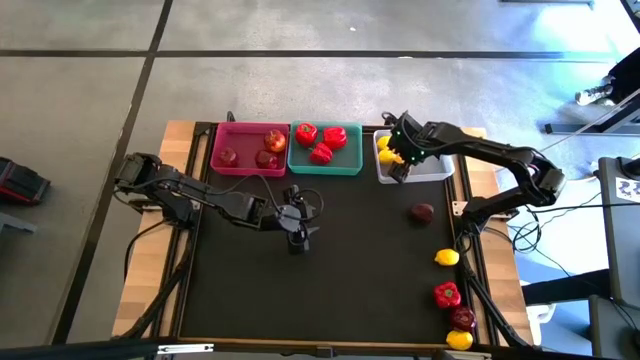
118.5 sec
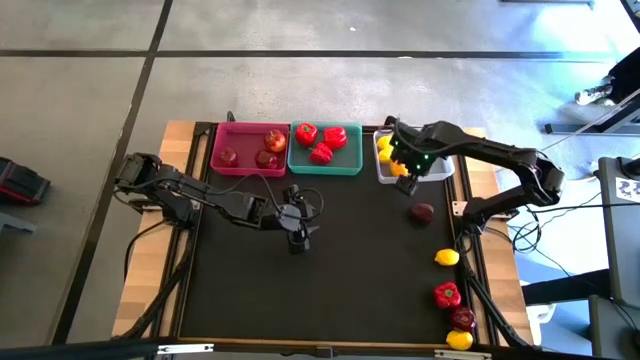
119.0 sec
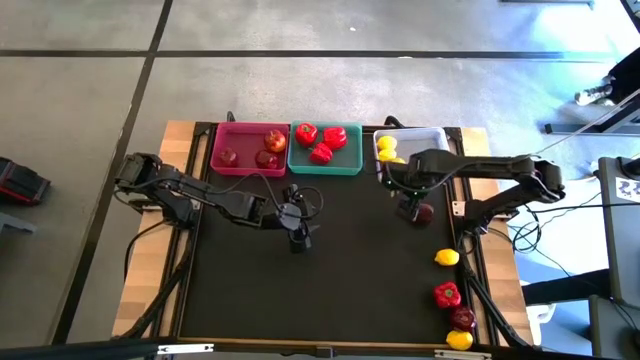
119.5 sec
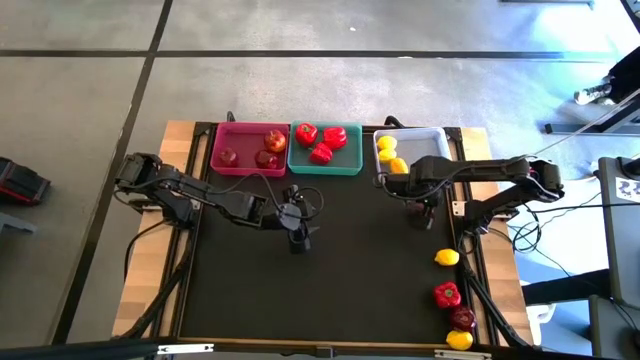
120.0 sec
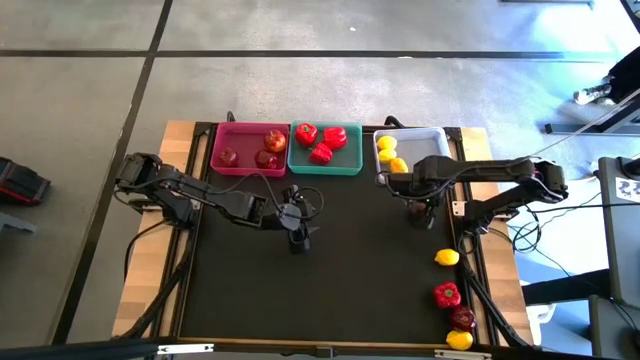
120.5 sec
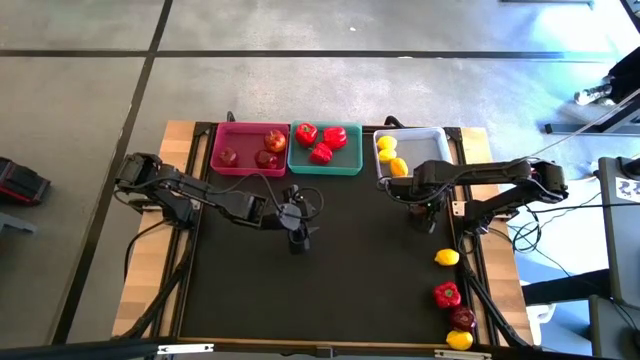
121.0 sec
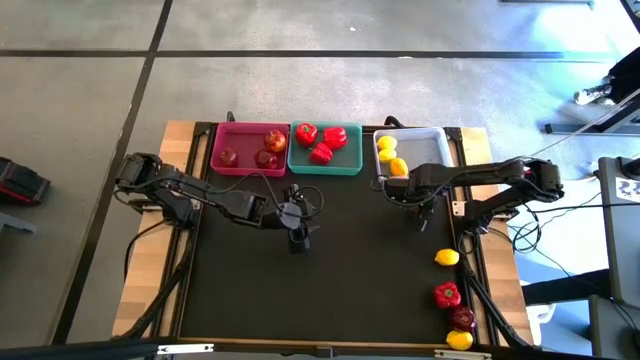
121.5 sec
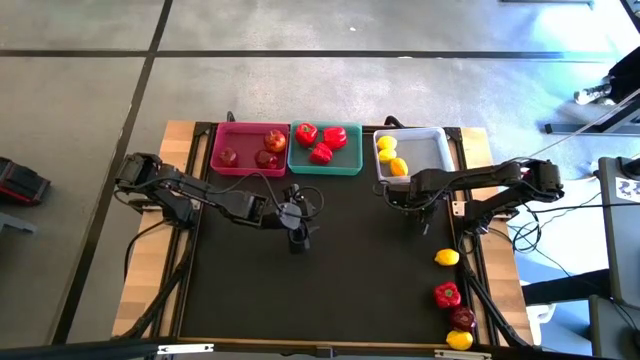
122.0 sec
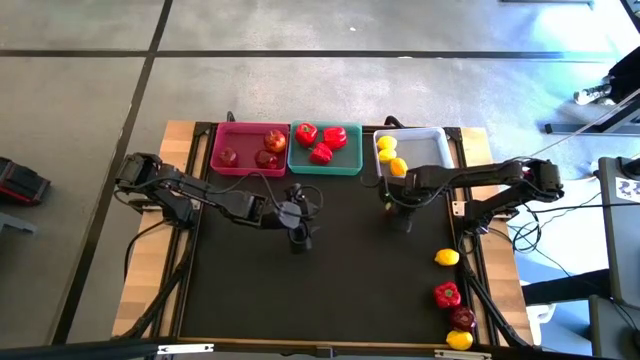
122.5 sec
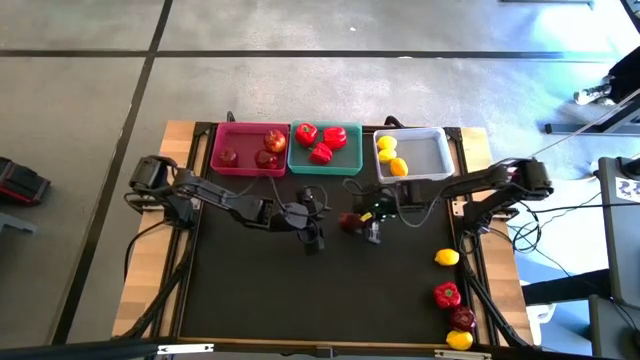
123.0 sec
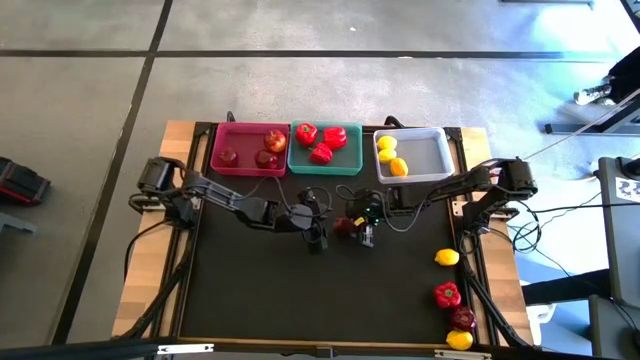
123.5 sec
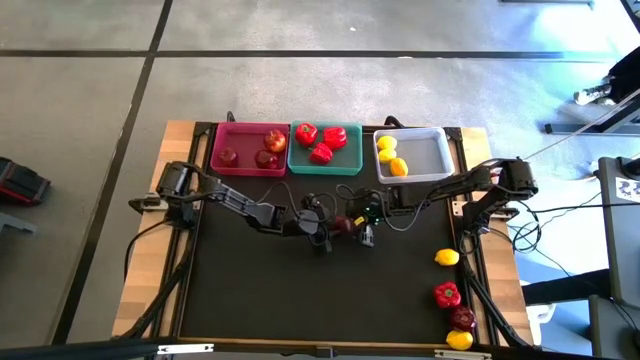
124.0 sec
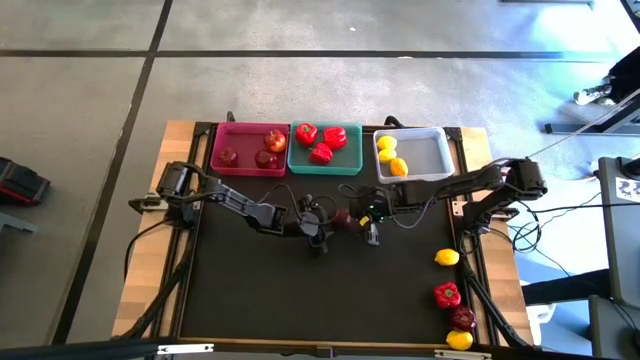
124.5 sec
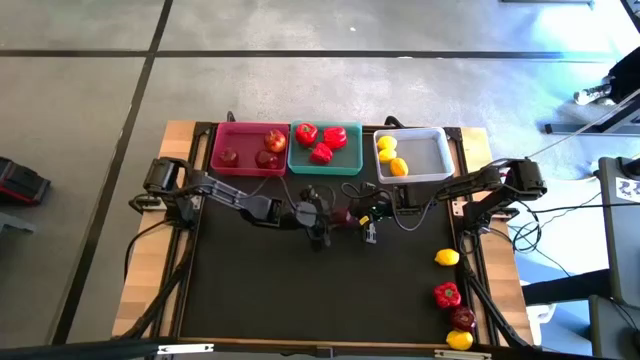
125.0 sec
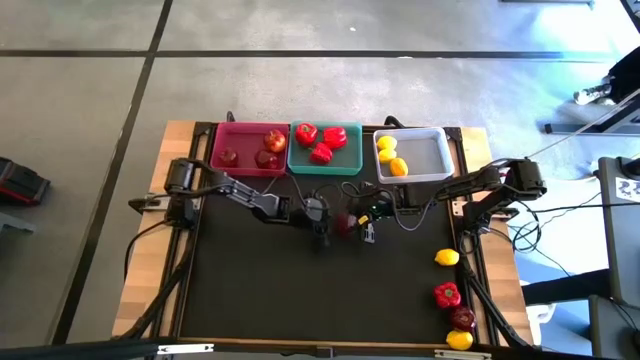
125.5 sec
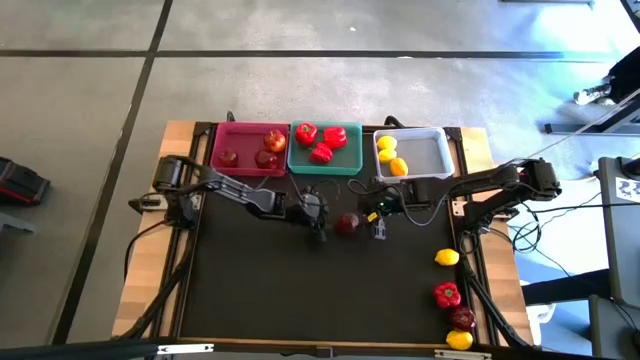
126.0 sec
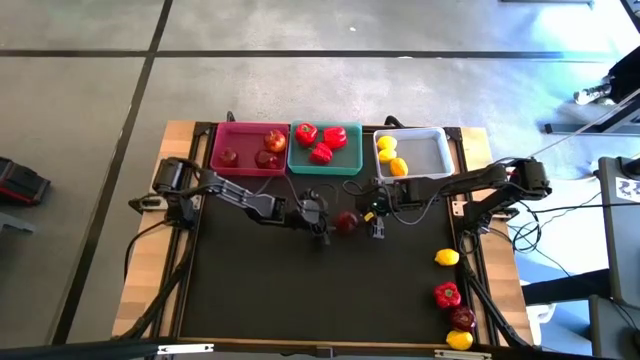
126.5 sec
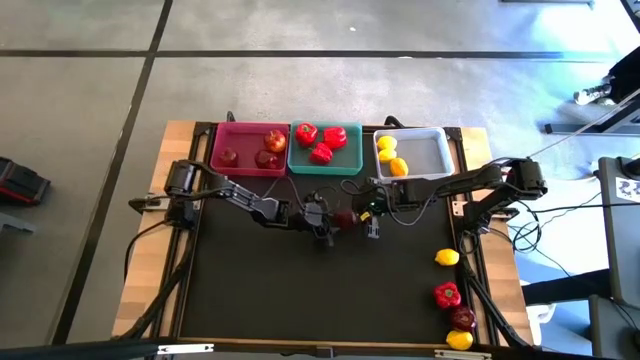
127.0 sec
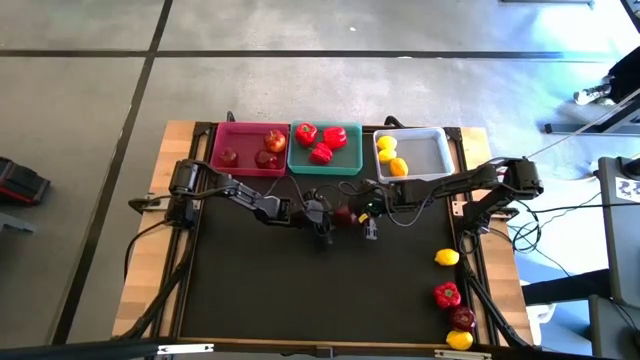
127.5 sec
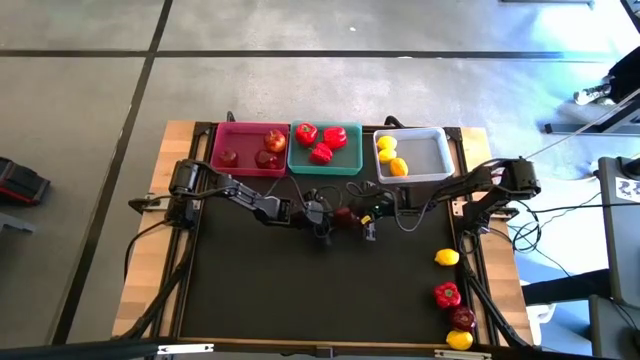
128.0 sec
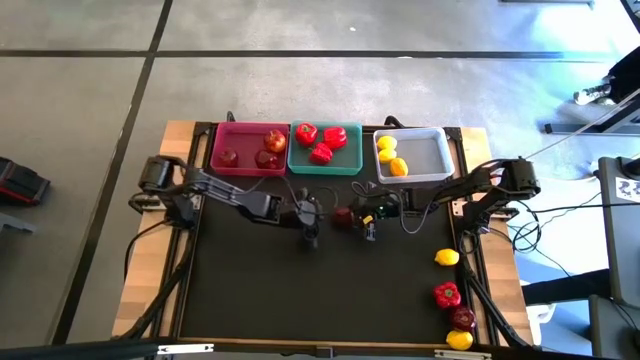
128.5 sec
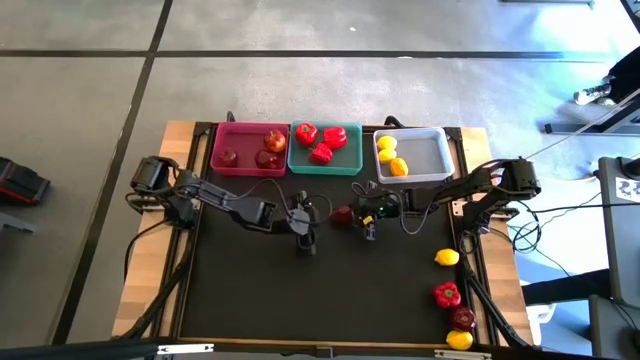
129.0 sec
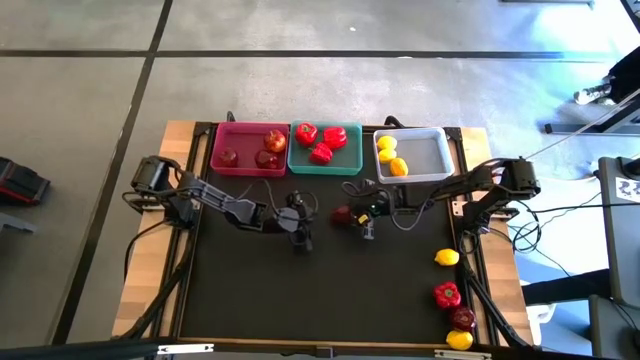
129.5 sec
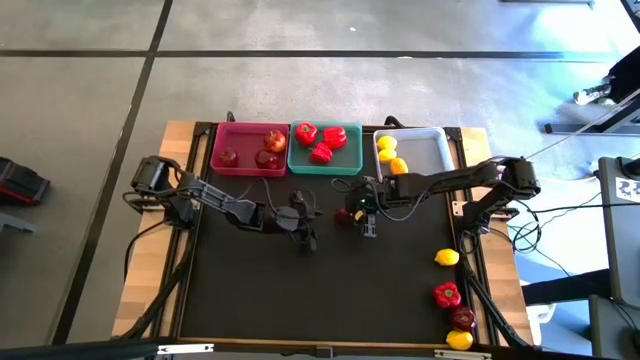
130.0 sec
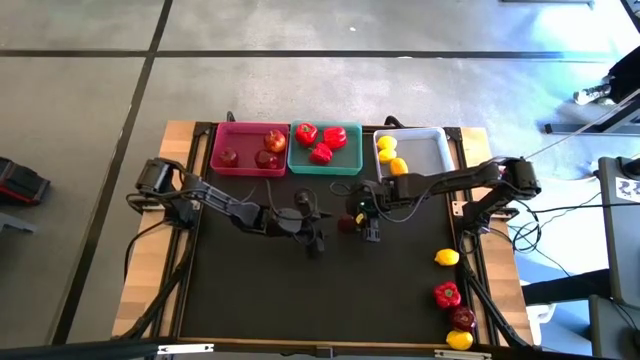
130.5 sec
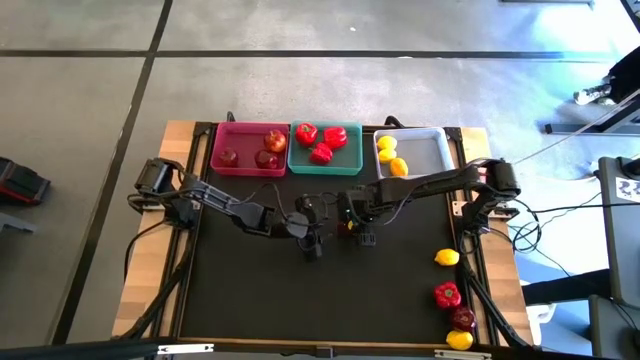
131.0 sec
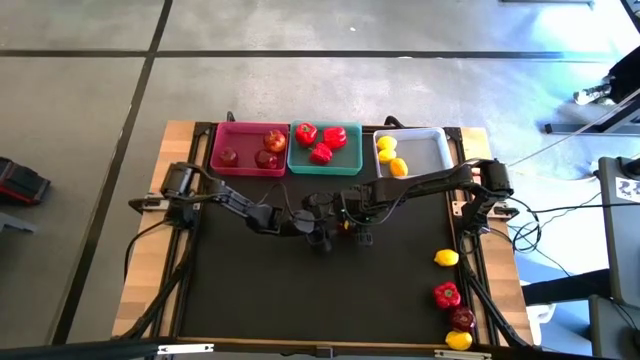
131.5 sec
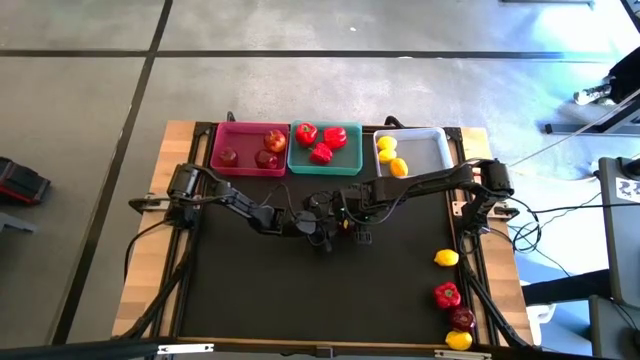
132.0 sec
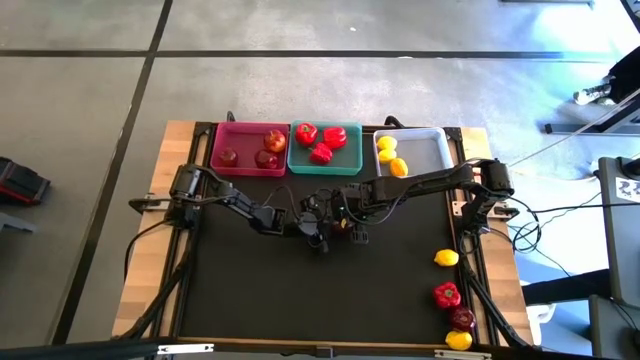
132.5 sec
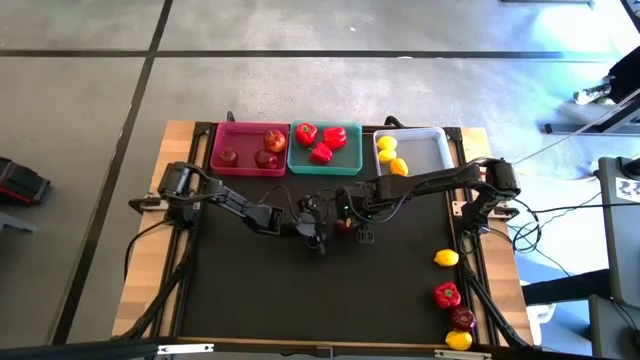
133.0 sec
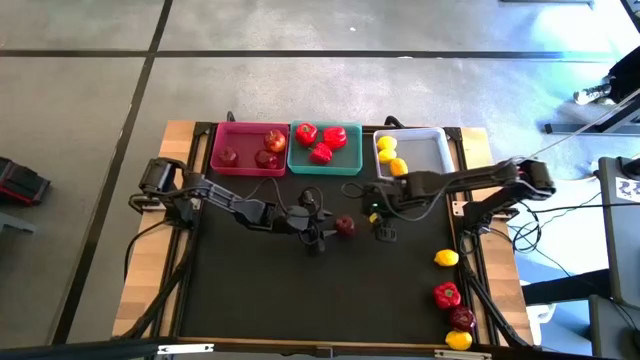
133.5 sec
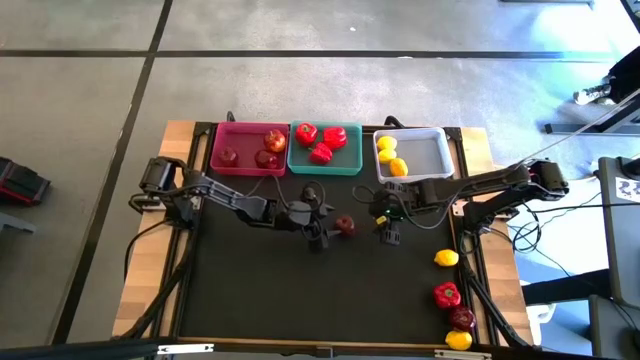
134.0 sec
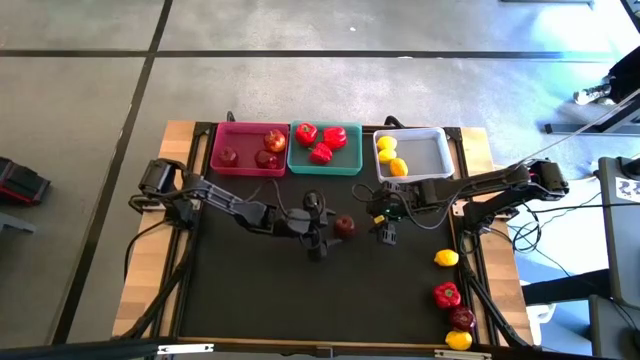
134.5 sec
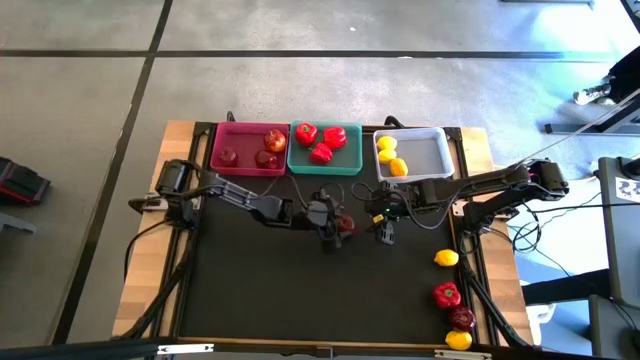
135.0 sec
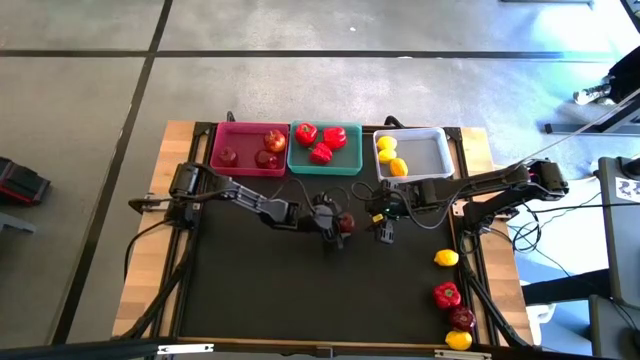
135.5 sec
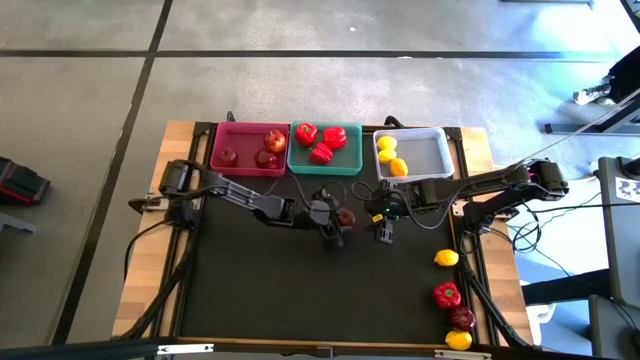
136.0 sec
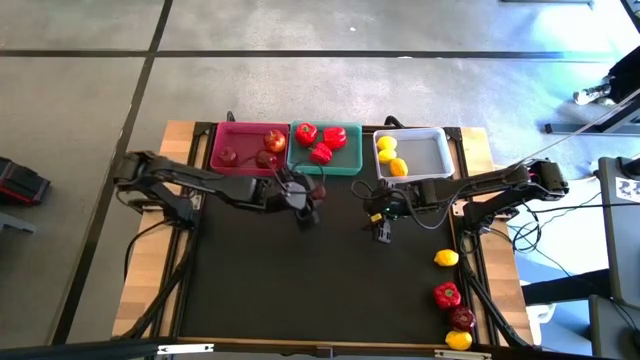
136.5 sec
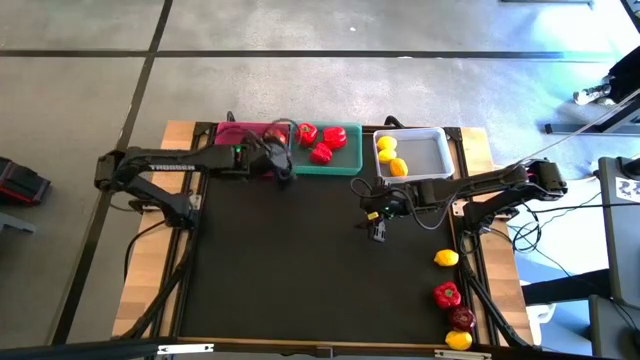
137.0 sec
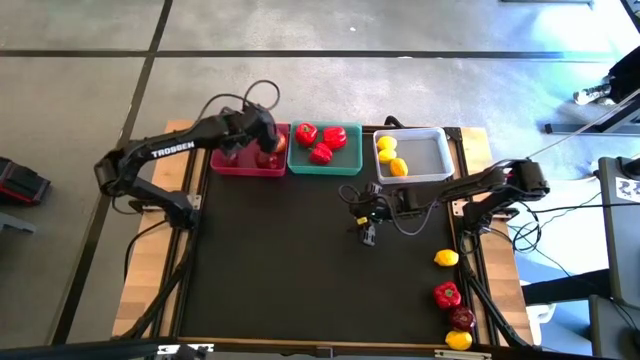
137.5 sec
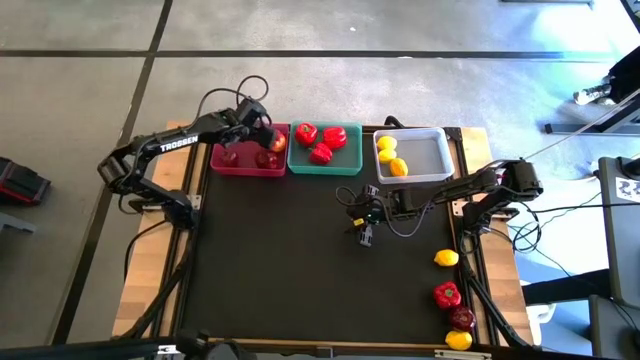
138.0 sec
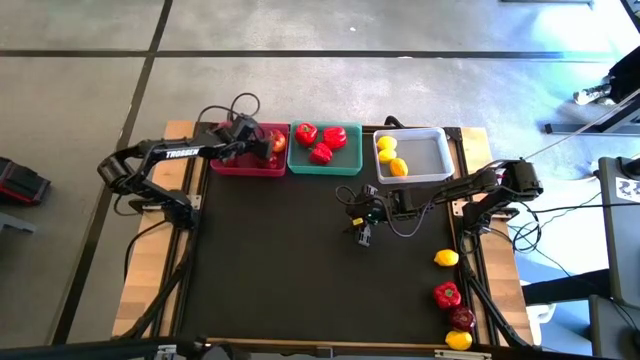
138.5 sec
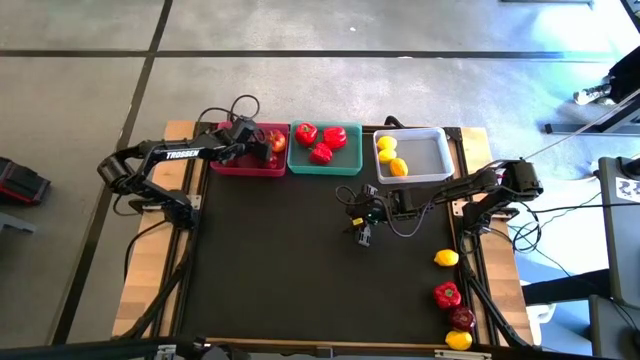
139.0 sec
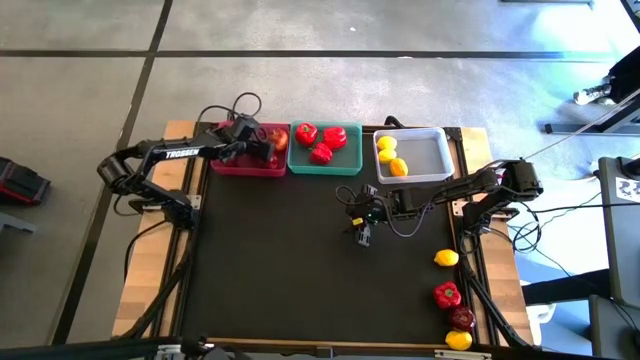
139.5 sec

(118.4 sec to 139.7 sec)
Task: Sort produce into baskets
Put the apple into the pink bin
